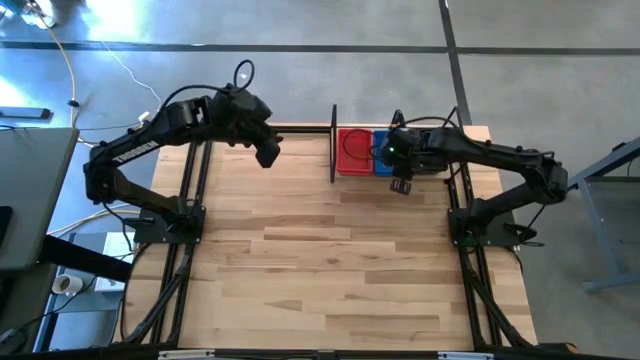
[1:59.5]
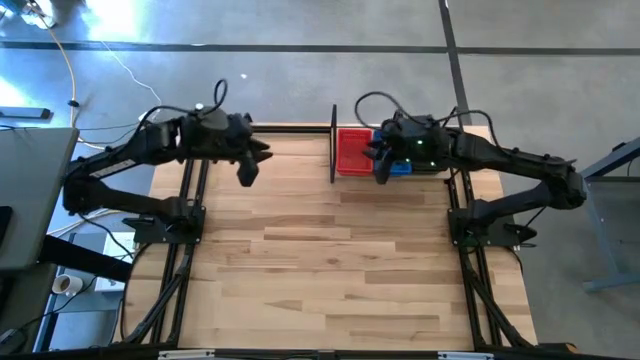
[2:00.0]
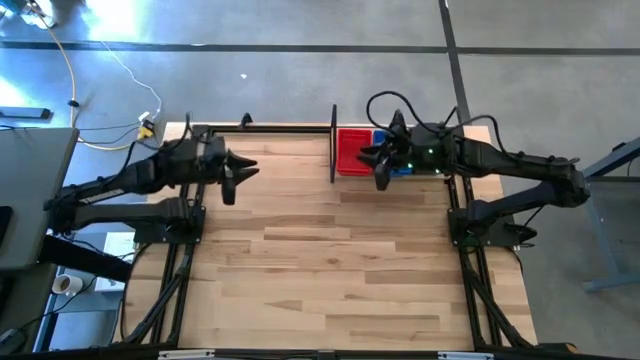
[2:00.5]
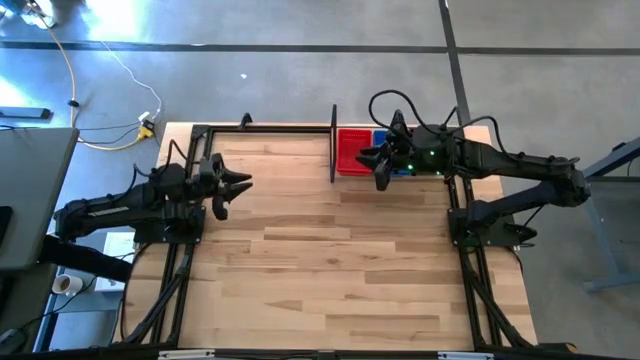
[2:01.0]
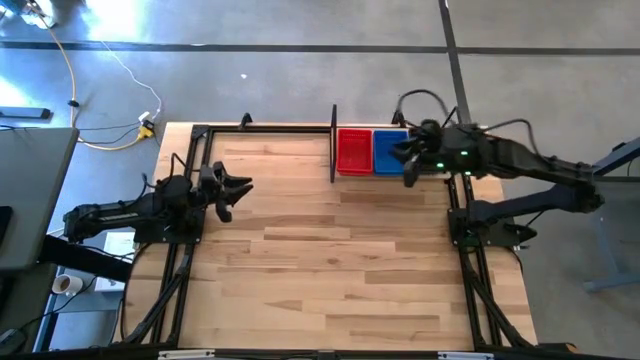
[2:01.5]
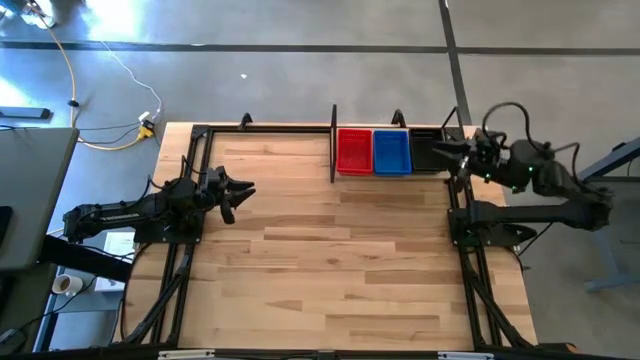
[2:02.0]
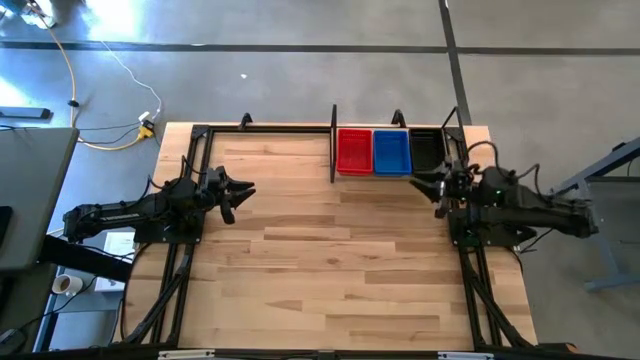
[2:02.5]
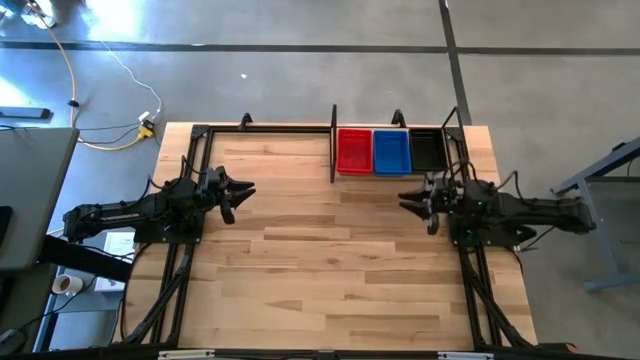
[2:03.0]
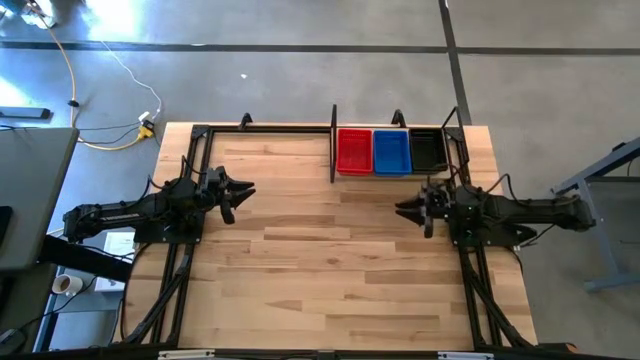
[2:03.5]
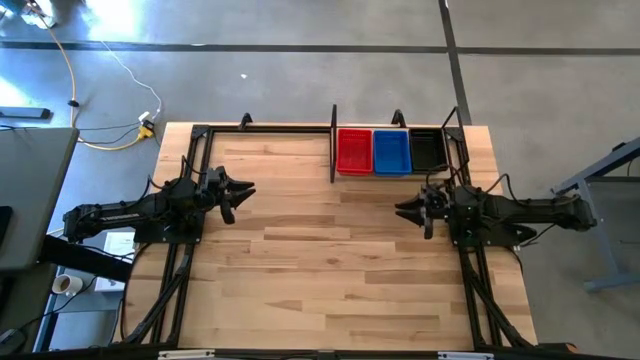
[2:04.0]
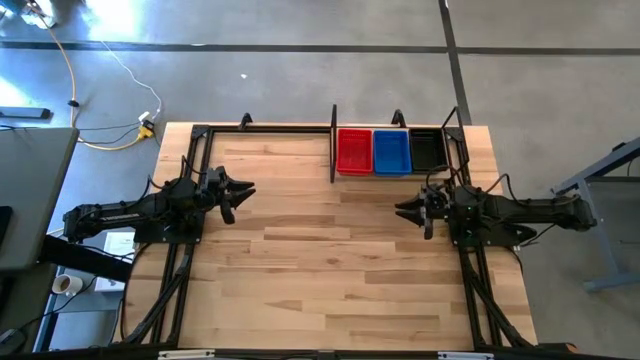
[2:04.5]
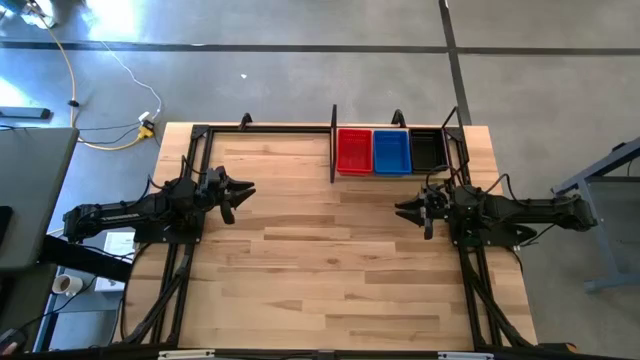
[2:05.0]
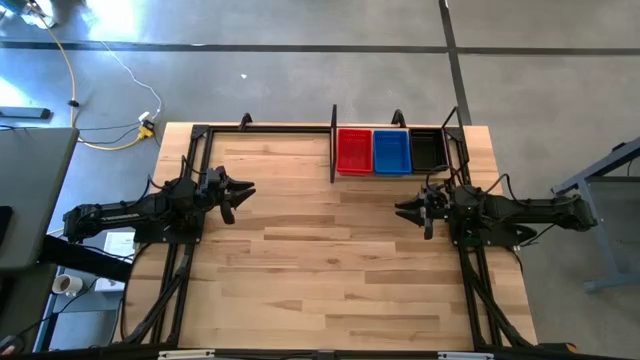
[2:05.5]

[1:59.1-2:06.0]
Task: Stack baskets on shelf by color
Return to Home Position

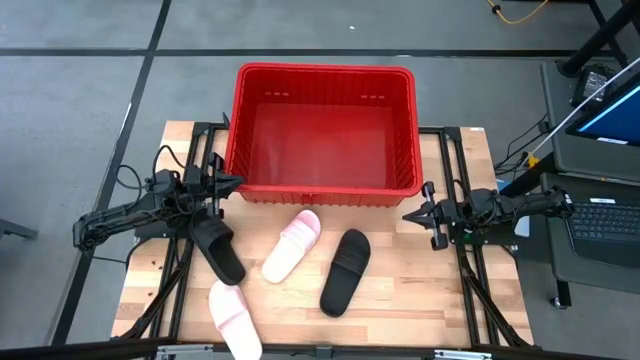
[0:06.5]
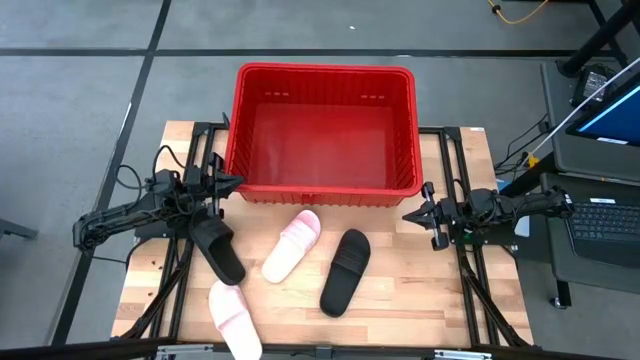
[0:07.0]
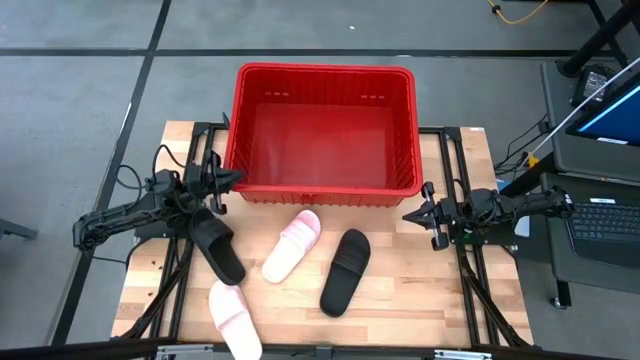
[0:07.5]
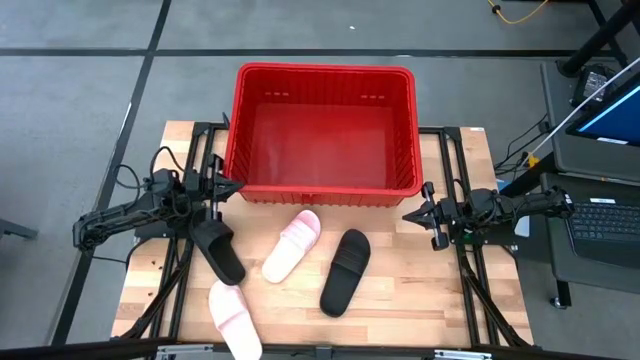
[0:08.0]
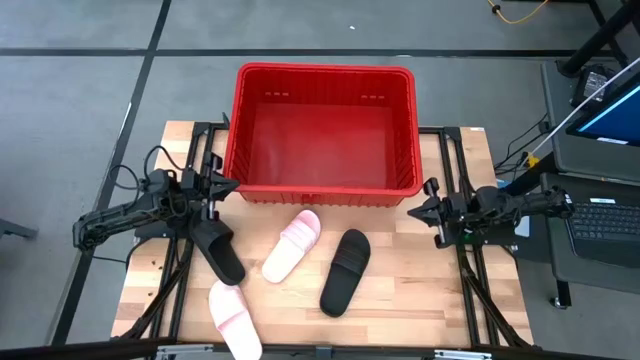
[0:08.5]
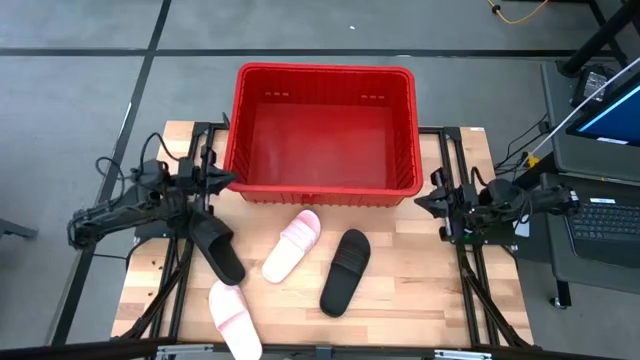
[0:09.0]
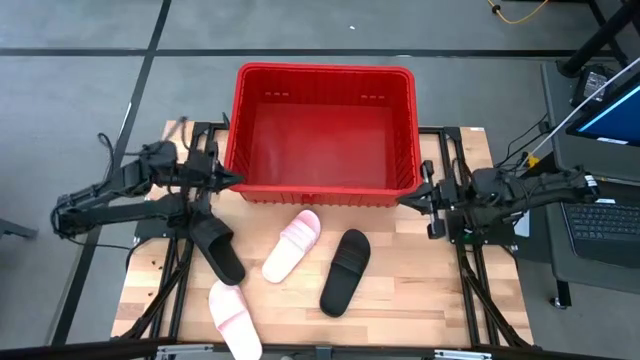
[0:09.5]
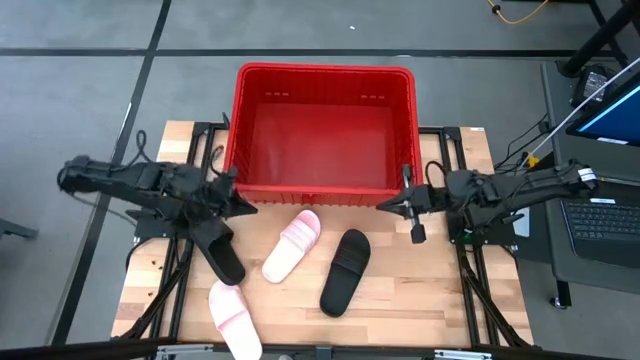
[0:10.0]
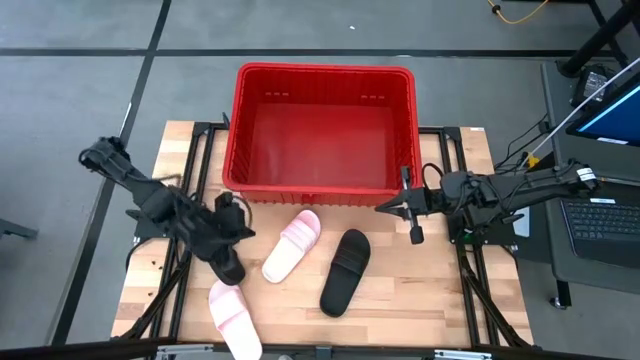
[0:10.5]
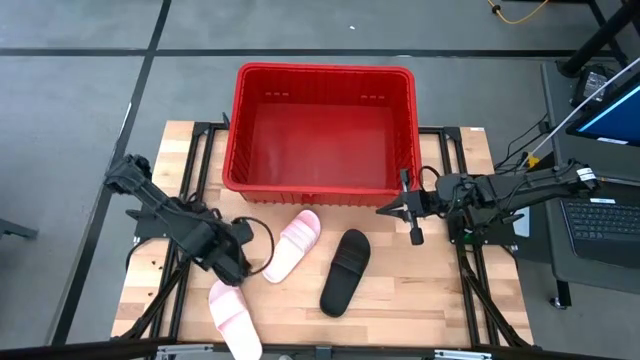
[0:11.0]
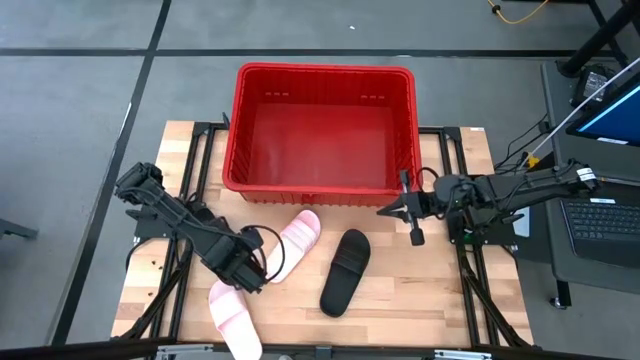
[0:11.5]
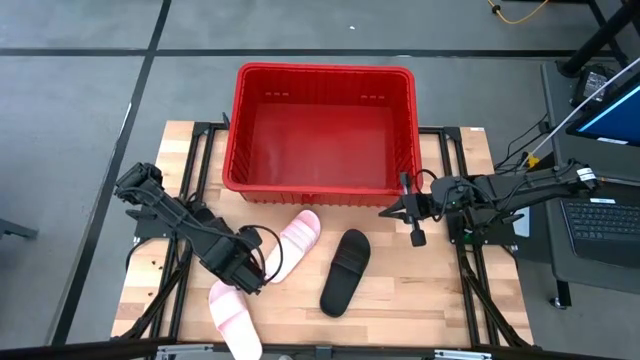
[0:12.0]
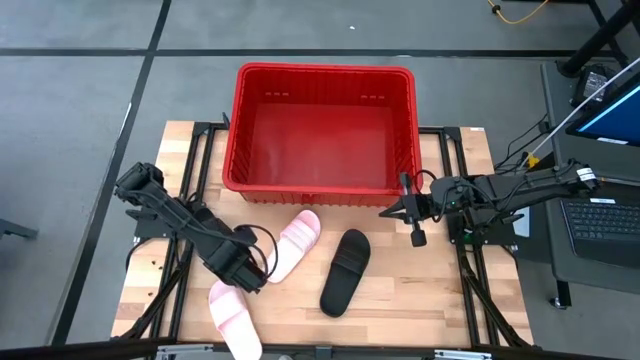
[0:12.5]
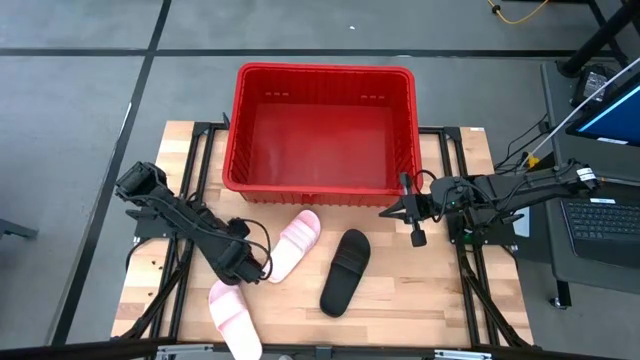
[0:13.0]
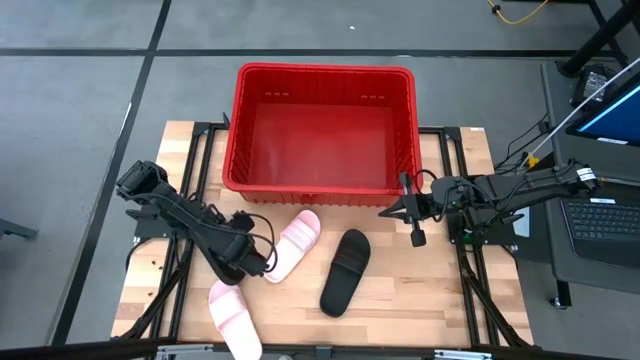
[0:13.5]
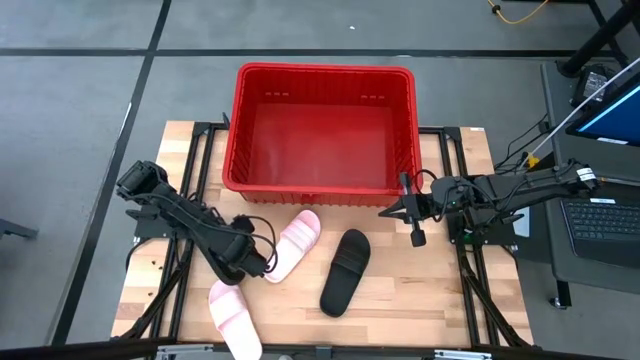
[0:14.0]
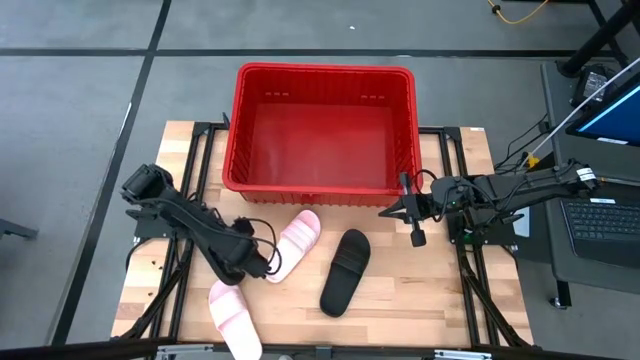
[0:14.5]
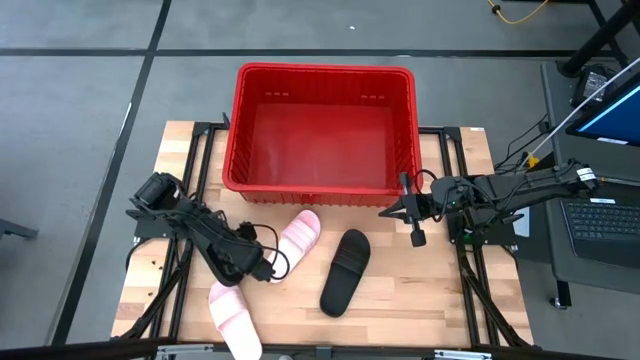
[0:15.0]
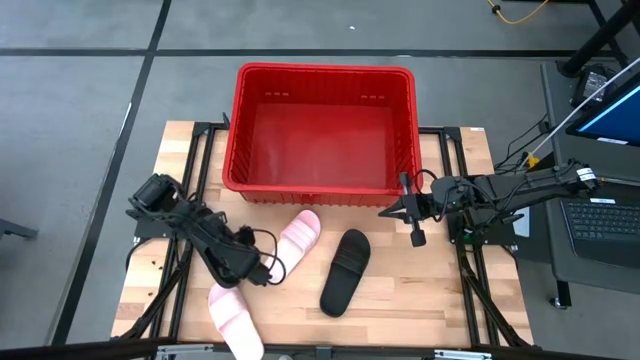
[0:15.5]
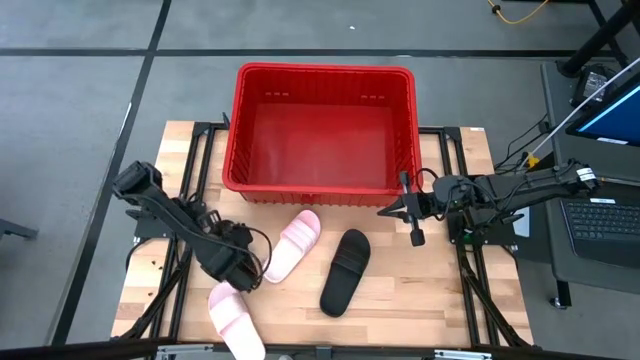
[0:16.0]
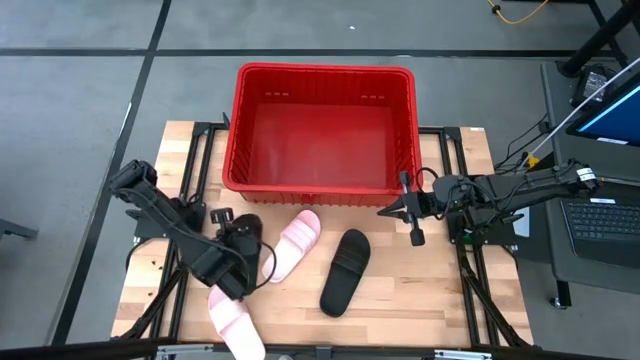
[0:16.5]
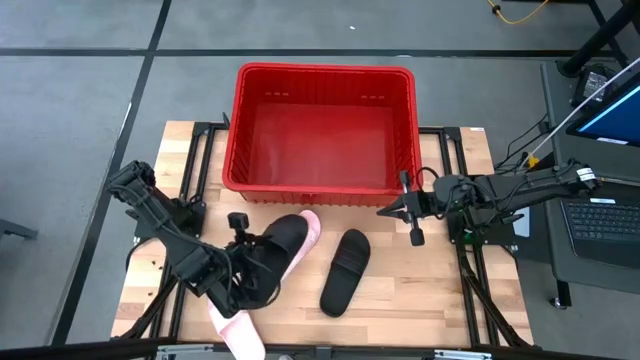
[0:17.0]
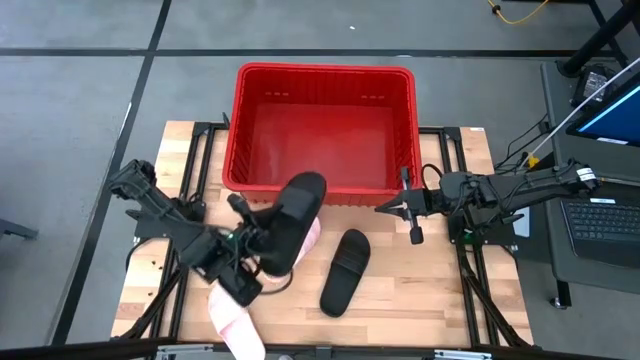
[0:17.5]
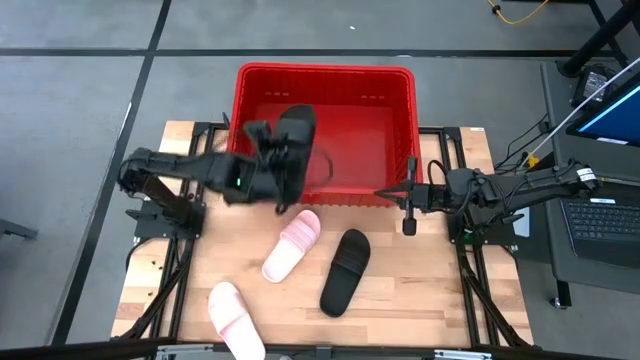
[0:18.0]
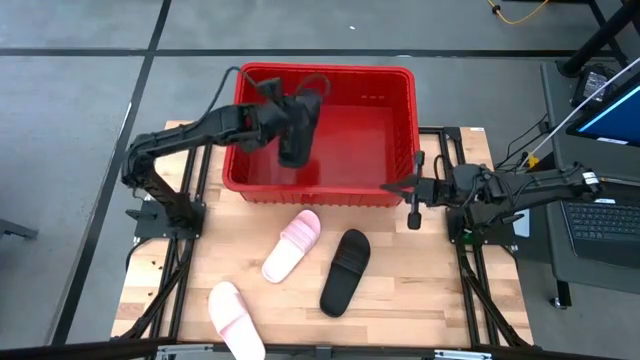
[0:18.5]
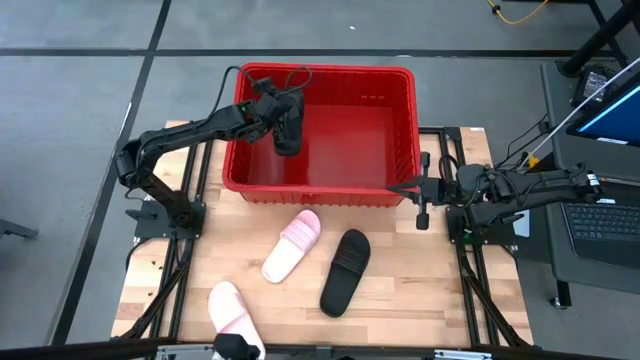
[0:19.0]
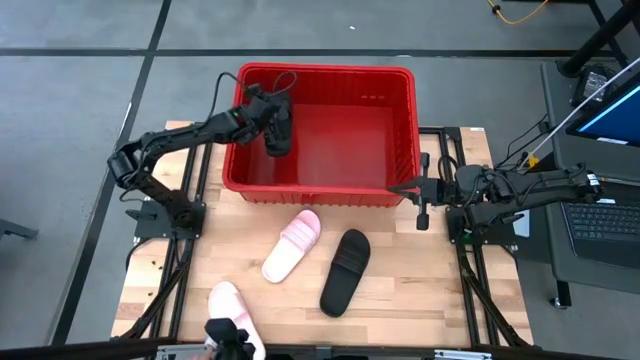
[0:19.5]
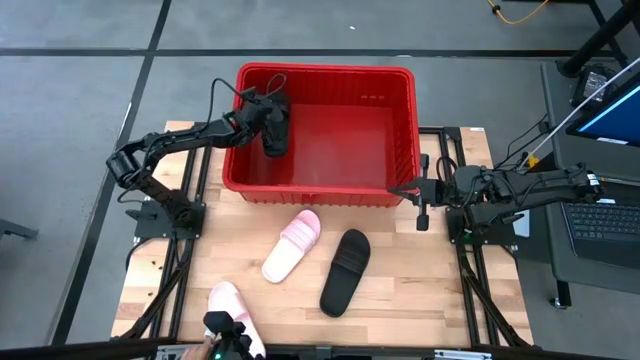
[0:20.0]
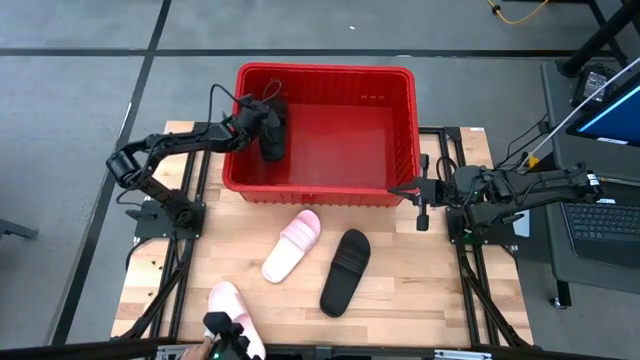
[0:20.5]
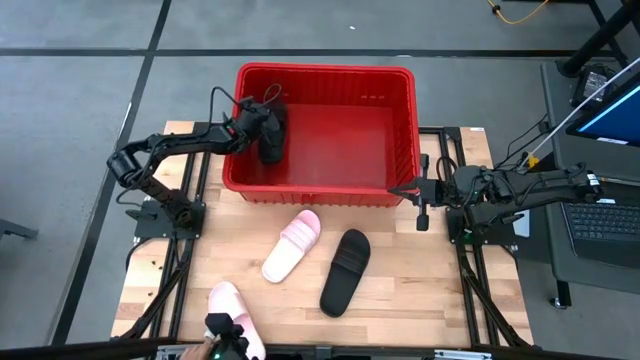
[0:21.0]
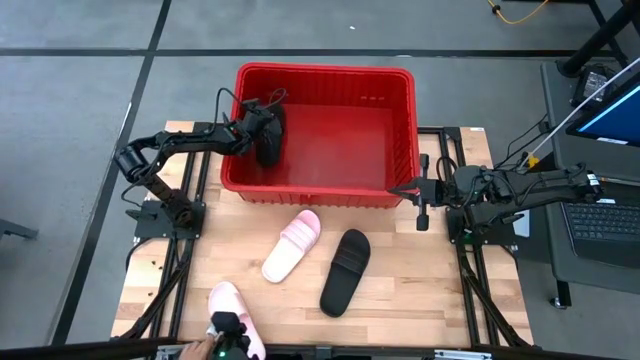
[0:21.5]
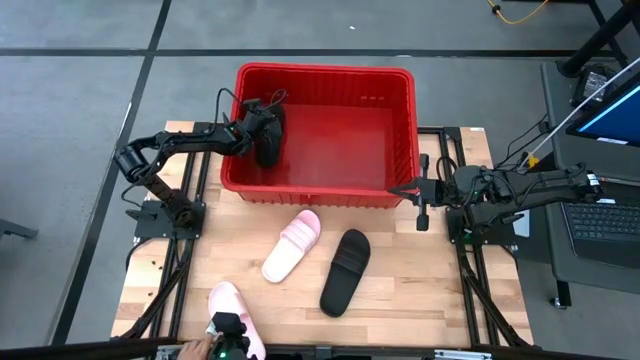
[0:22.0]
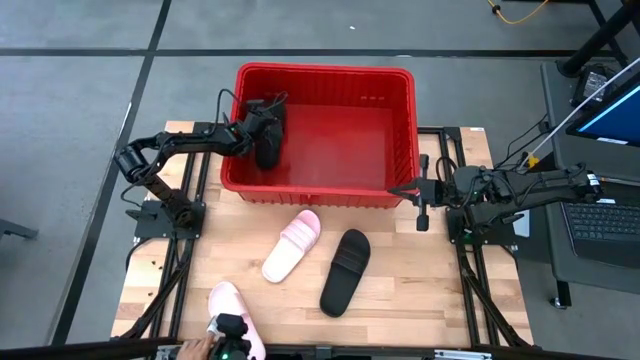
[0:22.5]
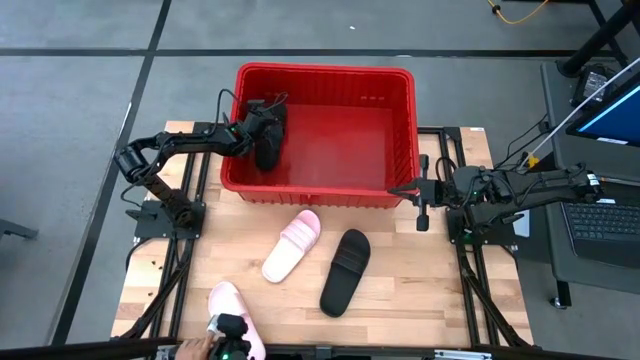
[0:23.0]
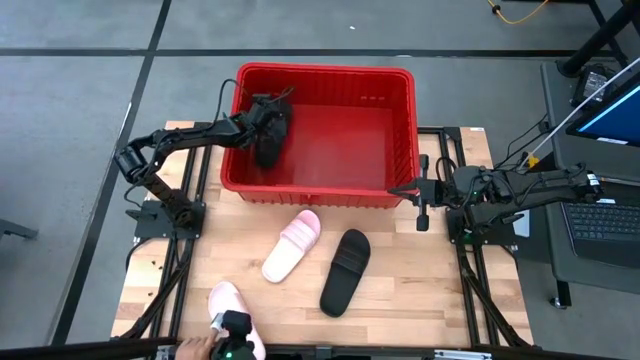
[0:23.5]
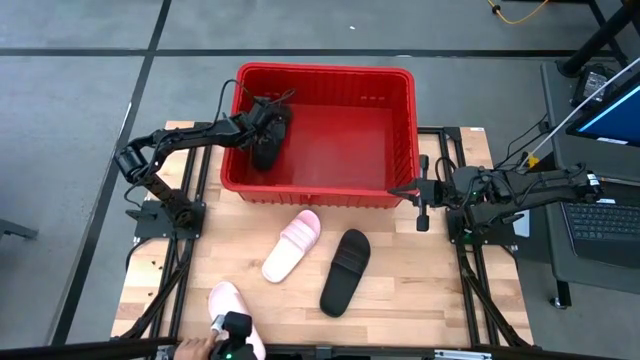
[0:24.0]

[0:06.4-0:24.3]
Task: Pick and place slides into bin
Put the left black slipper into the red bin
